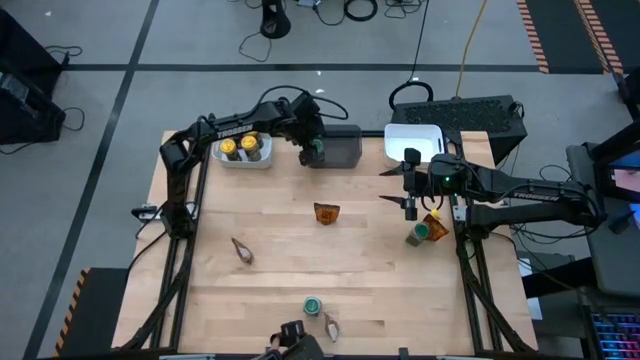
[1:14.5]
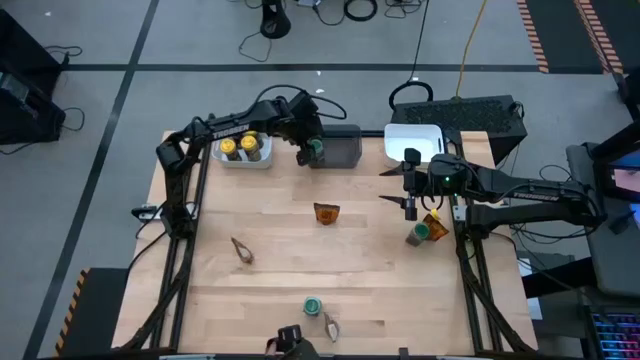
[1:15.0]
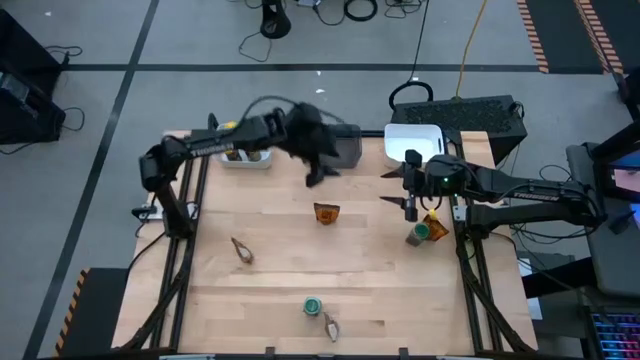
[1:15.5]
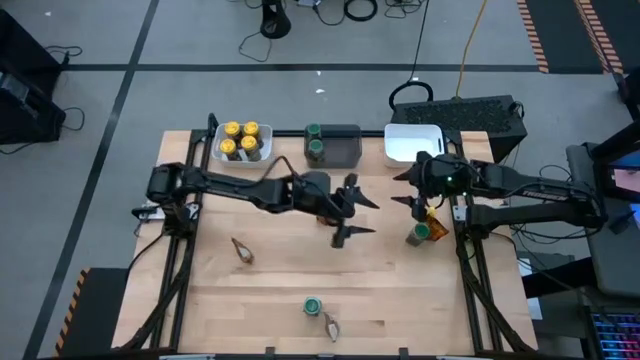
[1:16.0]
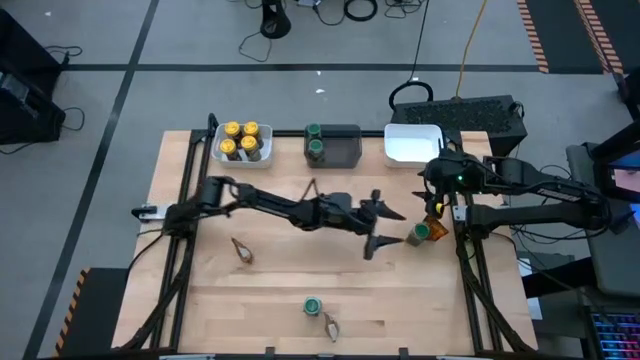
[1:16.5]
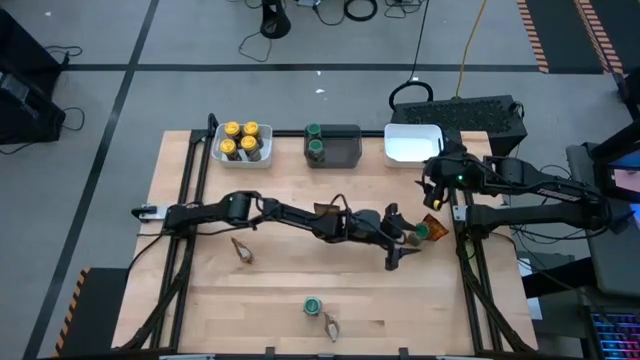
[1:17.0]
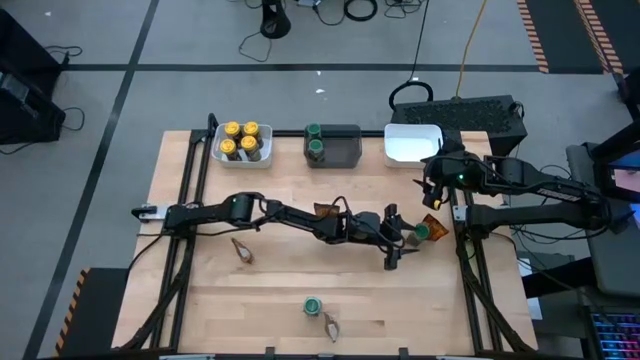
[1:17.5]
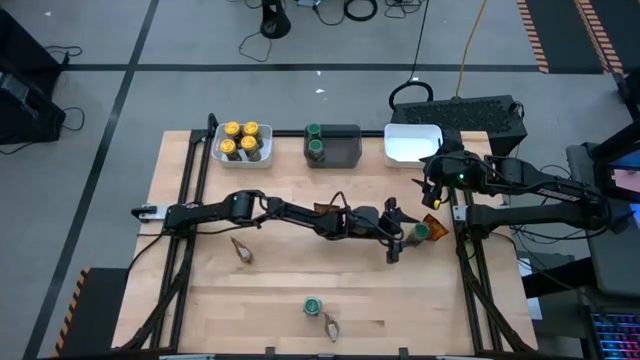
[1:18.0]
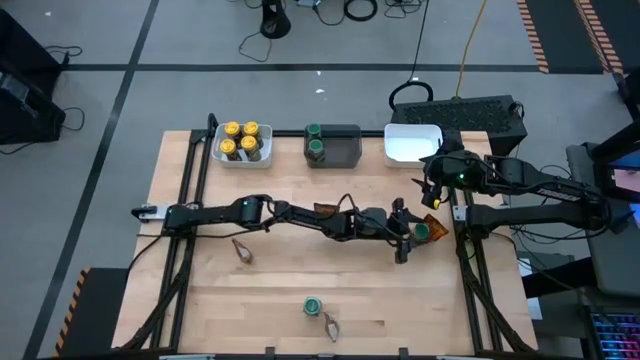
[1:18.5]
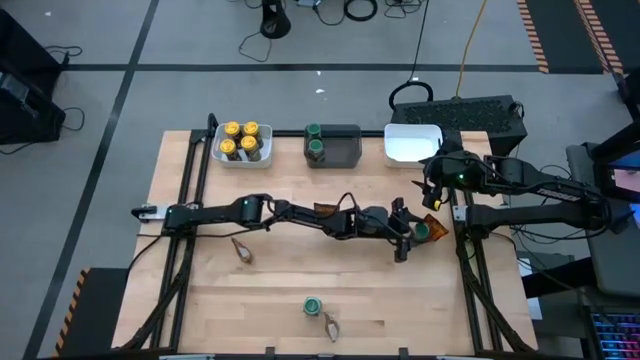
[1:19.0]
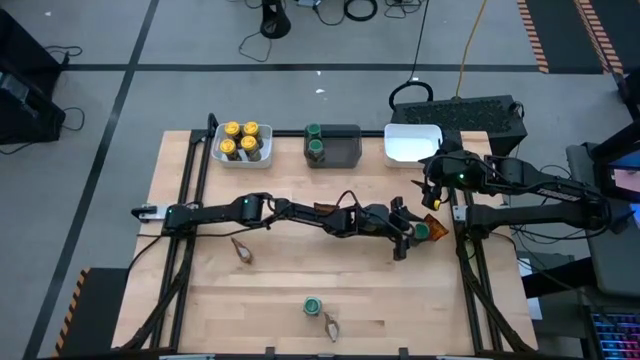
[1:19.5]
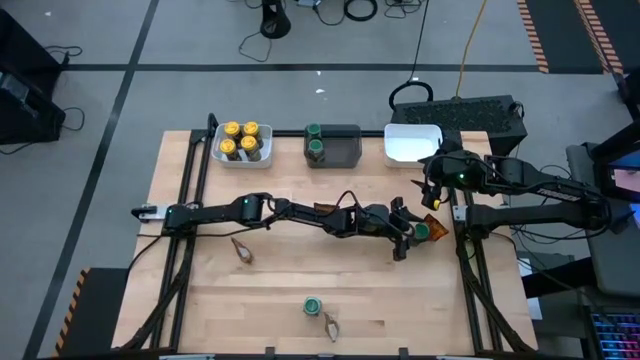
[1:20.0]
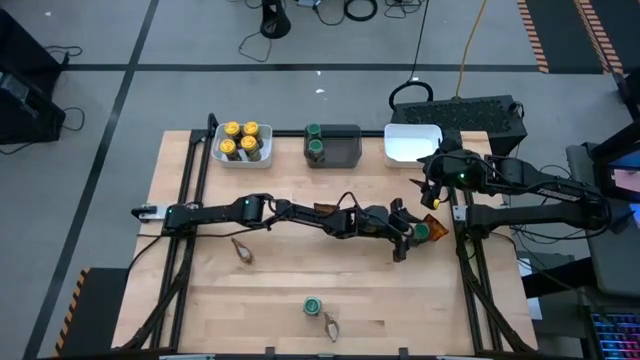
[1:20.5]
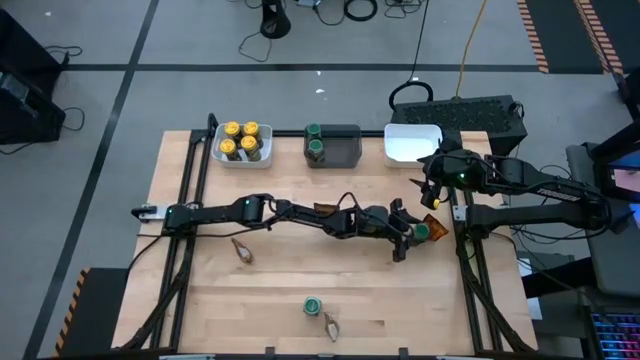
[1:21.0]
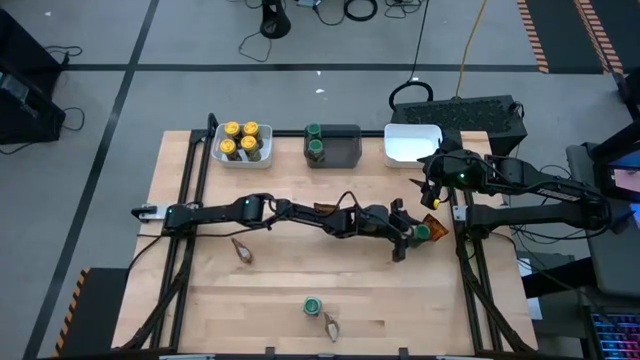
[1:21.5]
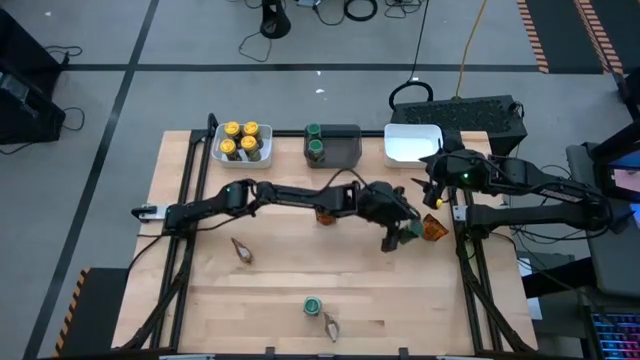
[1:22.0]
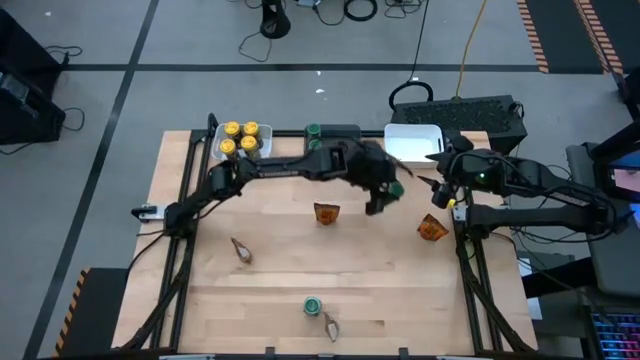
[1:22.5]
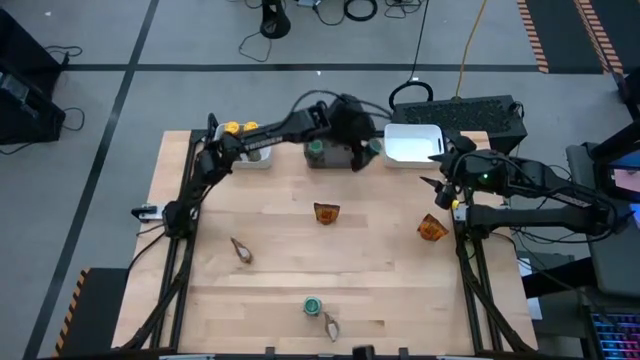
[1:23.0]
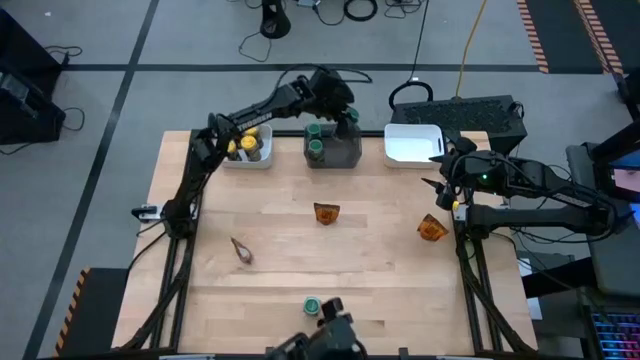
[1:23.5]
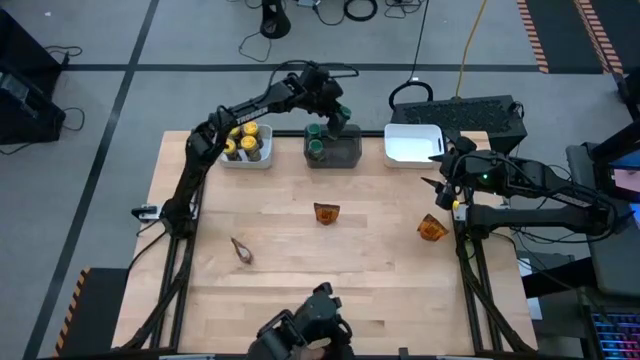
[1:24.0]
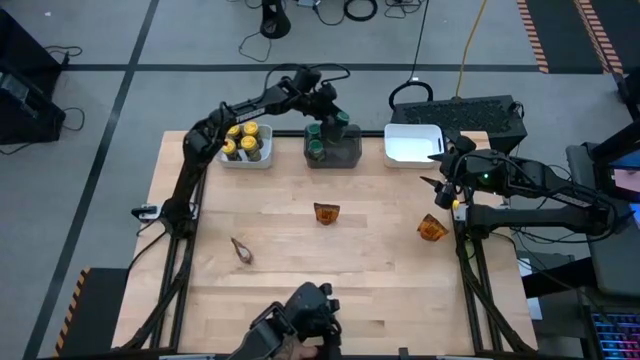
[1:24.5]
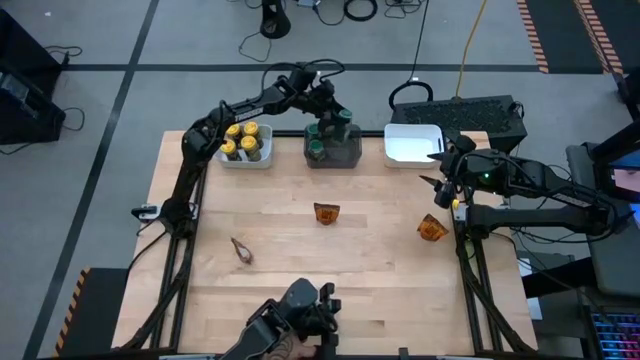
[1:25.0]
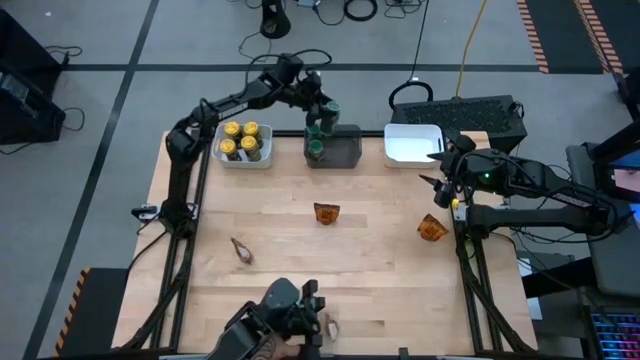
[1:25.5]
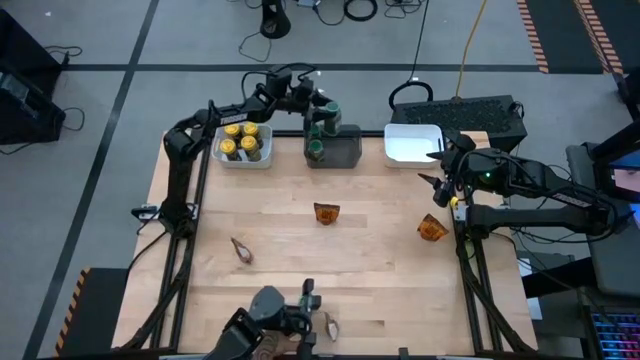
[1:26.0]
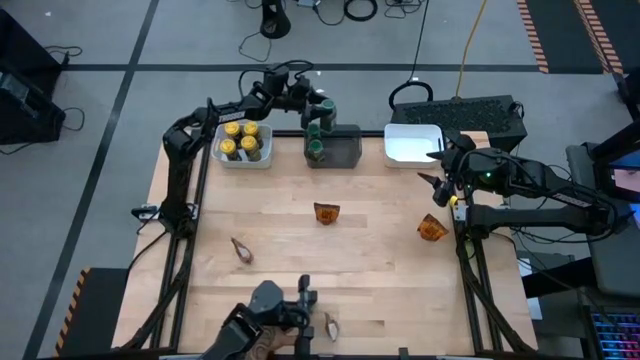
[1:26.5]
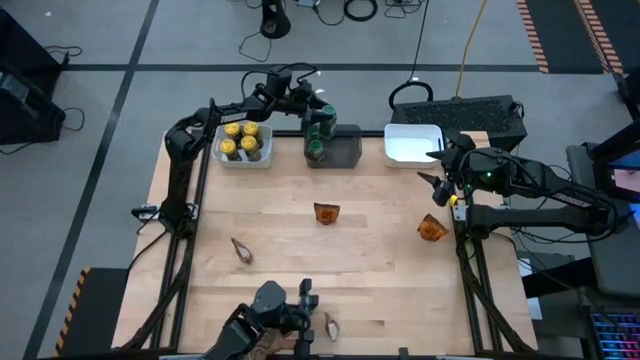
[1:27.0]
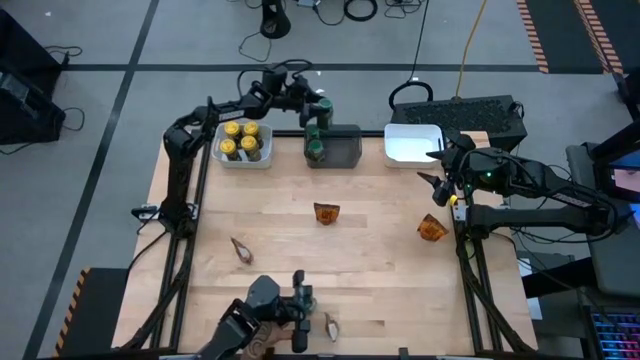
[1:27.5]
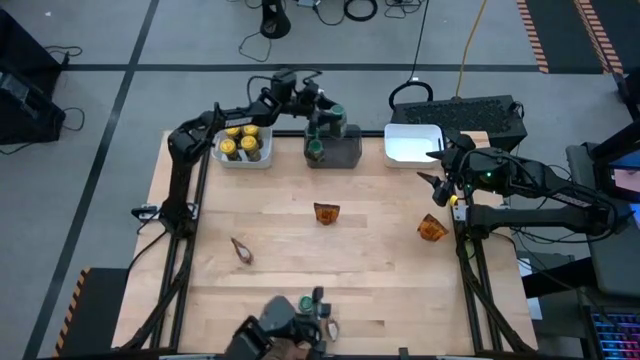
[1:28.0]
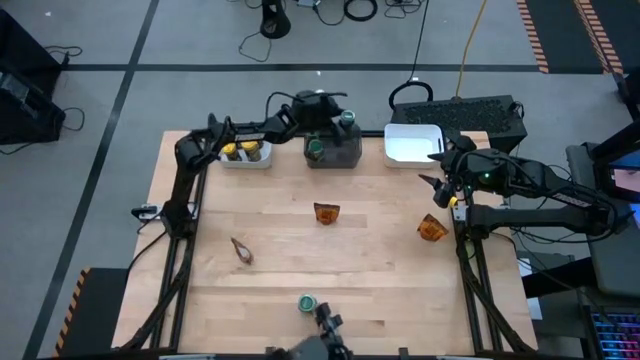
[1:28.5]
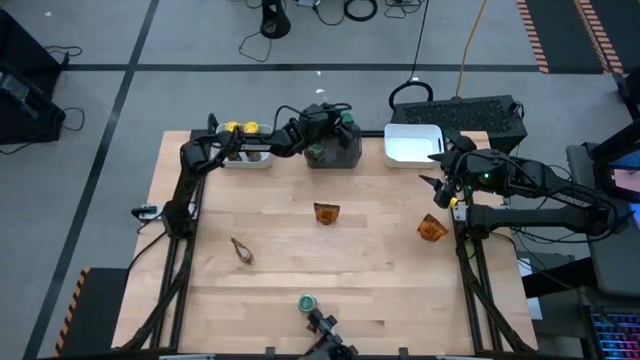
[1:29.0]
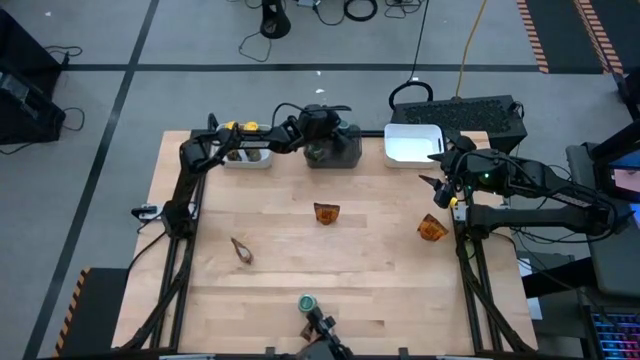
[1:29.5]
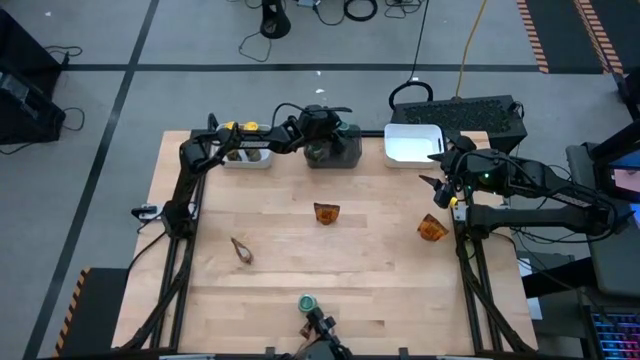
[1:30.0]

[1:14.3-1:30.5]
Task: Sort spices by type
Put the top green seasoning bottle into the black bin

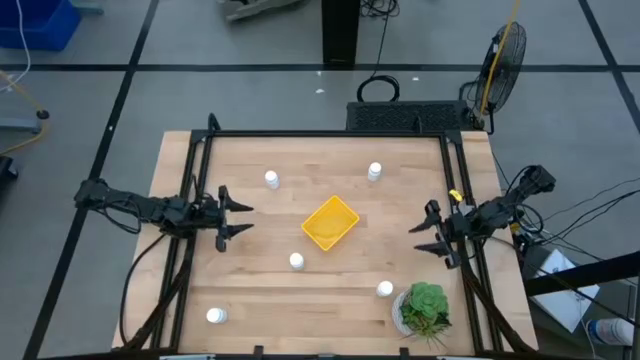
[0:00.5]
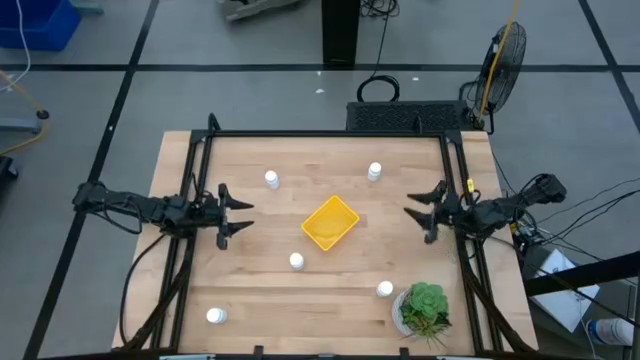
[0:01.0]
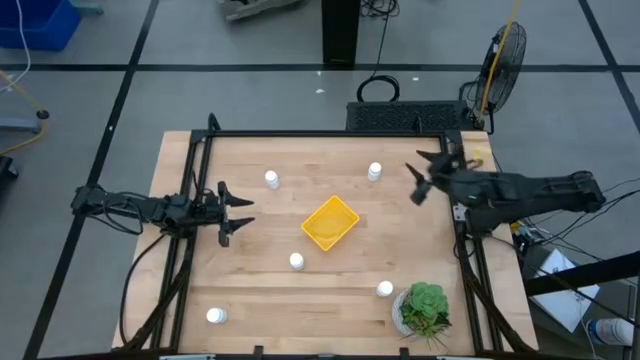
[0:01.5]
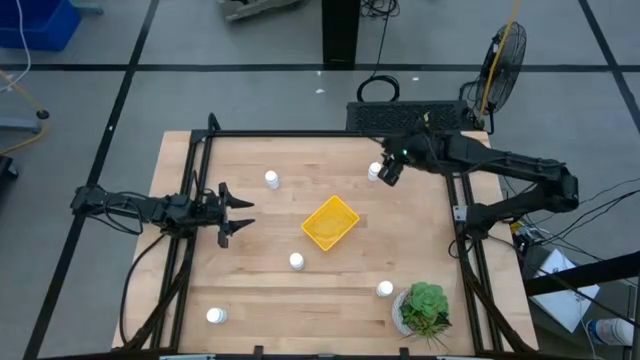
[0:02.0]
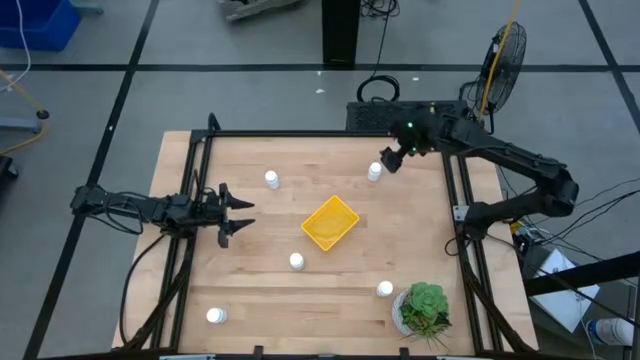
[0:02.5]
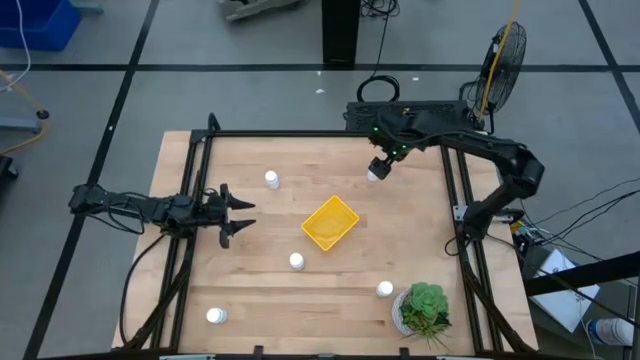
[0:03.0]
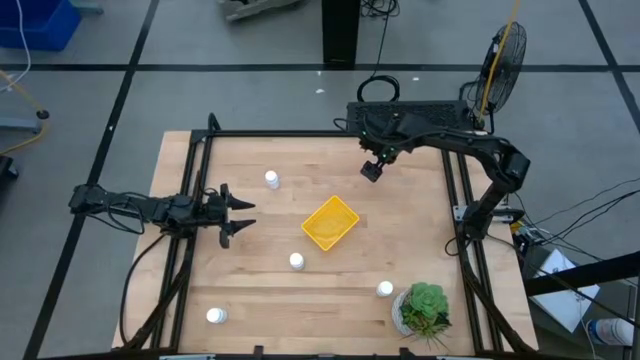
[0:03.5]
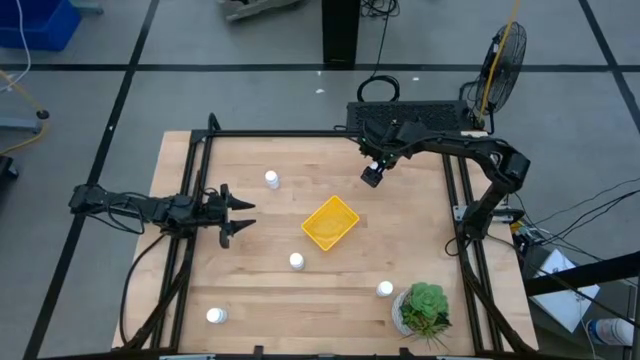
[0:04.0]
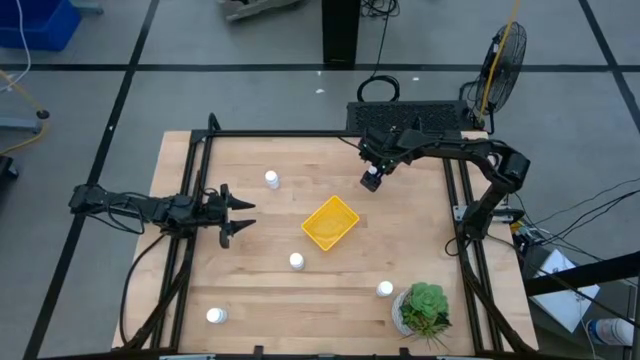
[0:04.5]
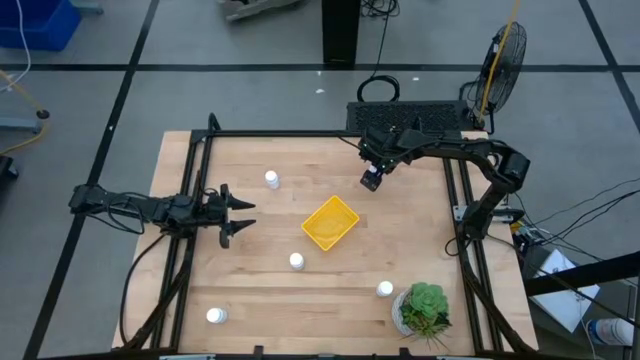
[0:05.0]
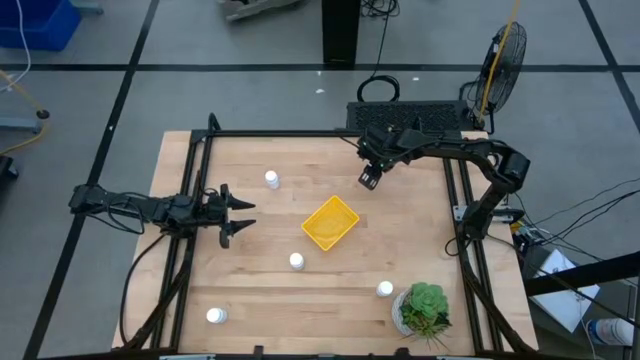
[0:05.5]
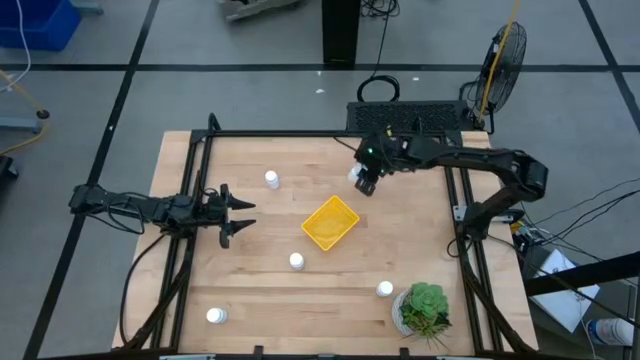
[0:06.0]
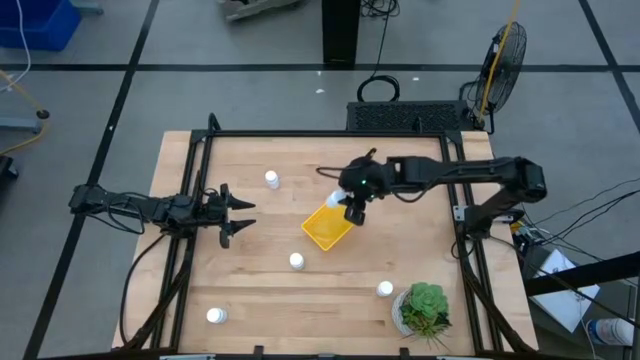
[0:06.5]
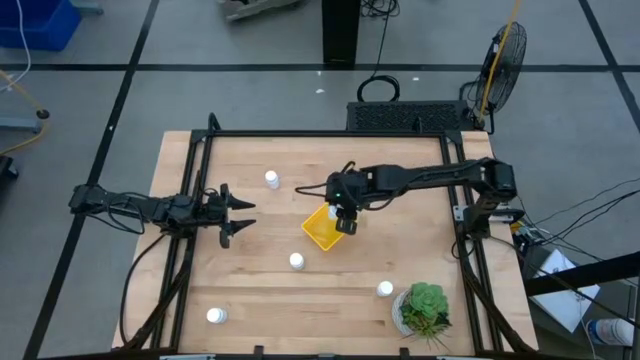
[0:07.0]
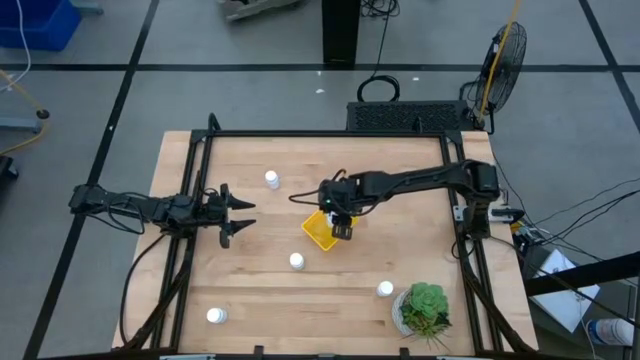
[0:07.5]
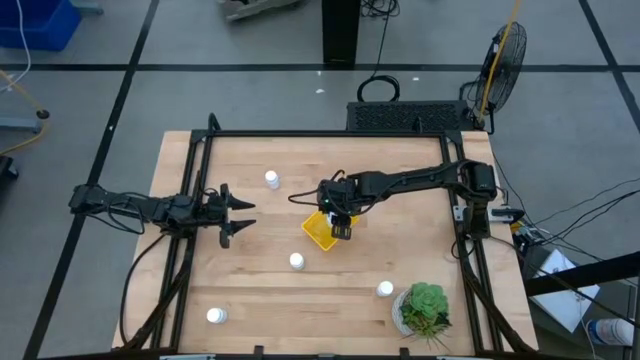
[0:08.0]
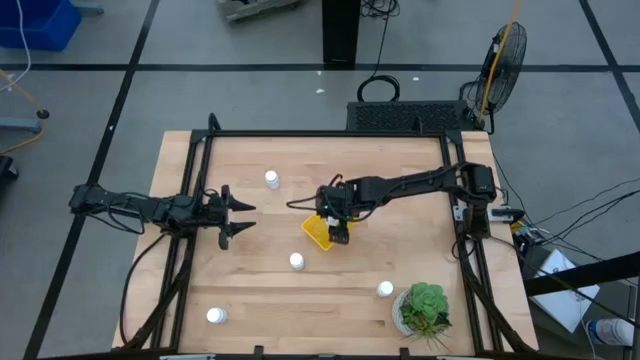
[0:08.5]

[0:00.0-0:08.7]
Task: Pick and place pill bottles into a basket
Put the white medicine bottle into the yellow bin
